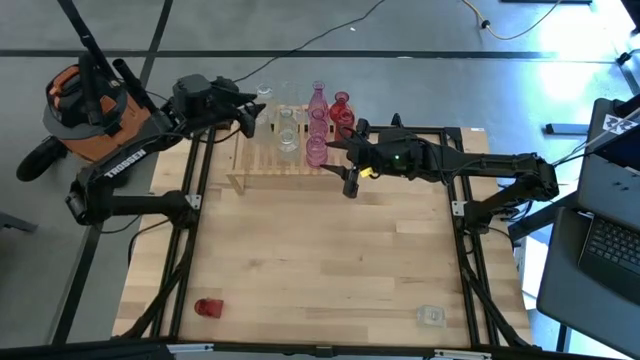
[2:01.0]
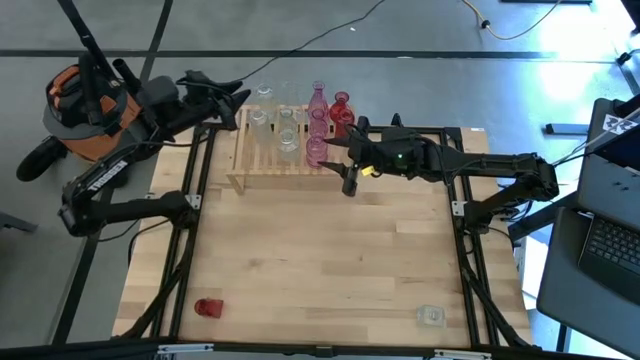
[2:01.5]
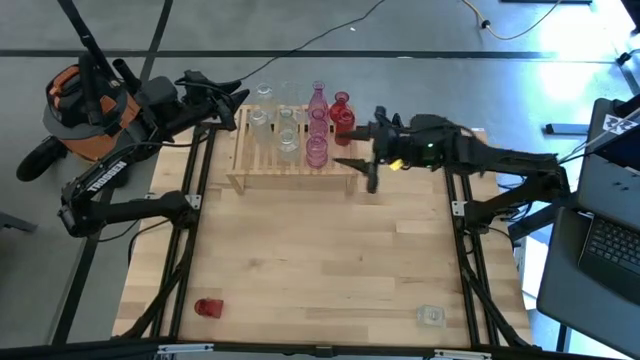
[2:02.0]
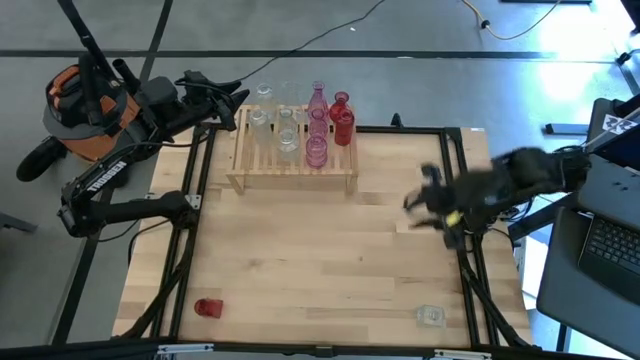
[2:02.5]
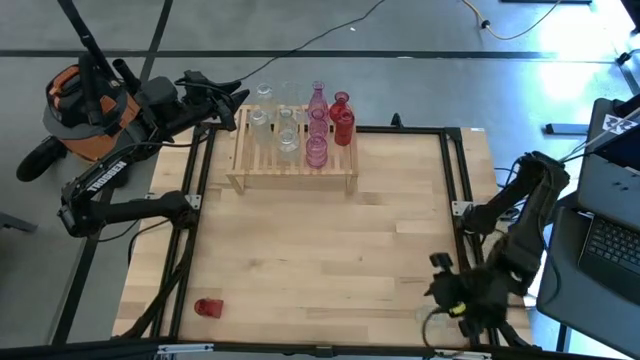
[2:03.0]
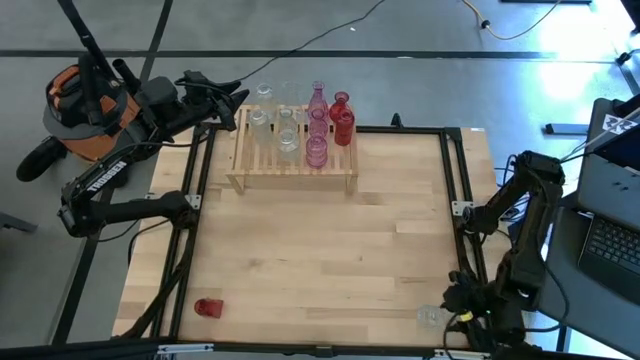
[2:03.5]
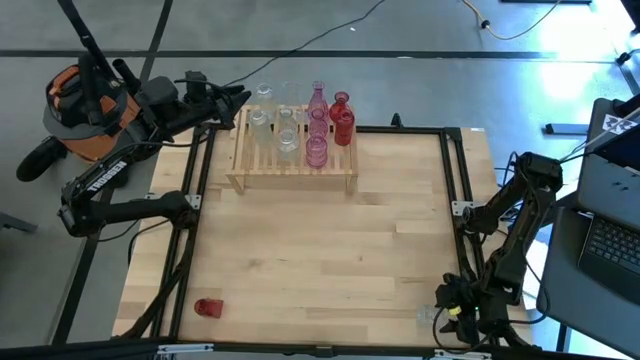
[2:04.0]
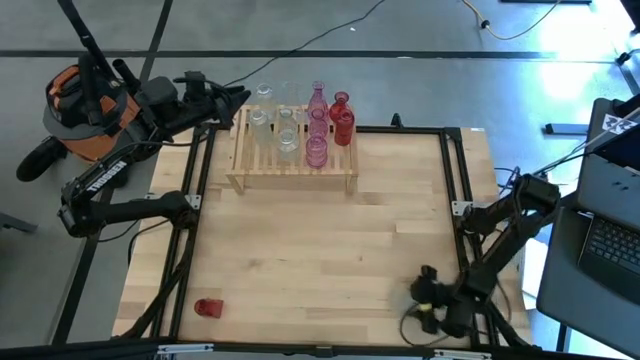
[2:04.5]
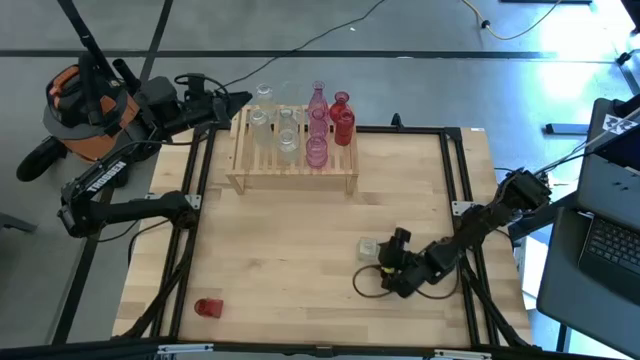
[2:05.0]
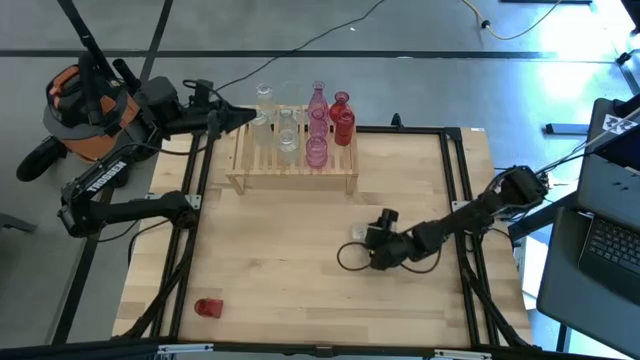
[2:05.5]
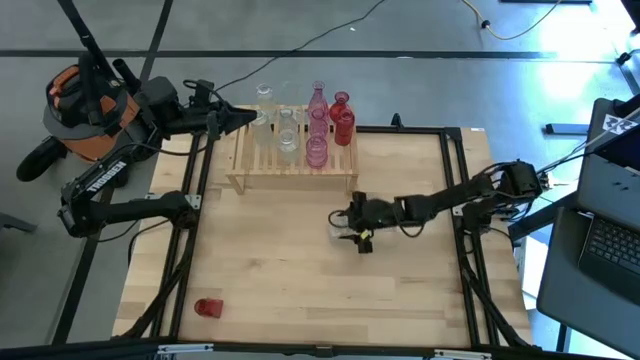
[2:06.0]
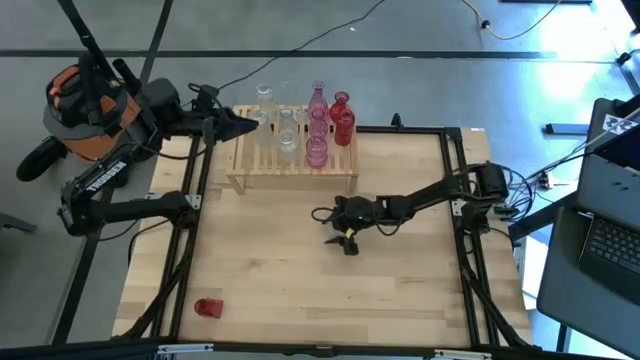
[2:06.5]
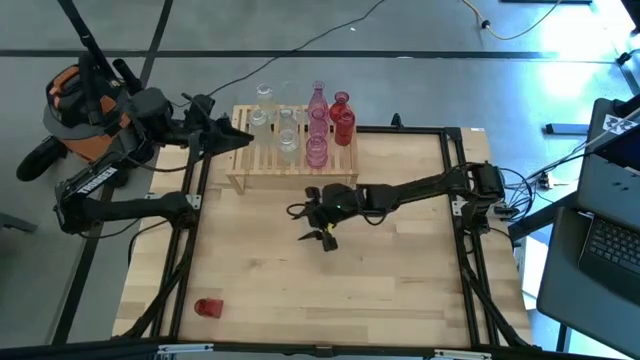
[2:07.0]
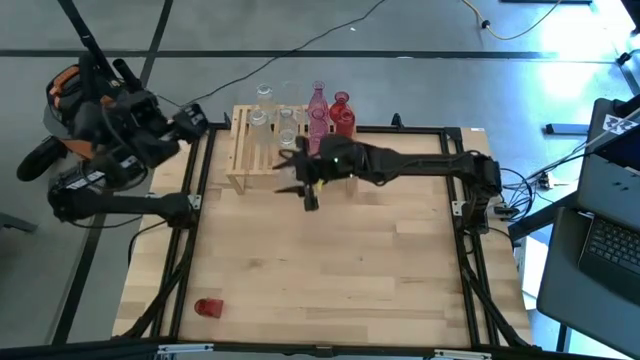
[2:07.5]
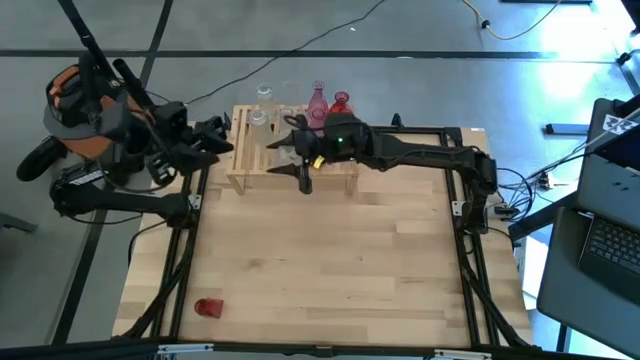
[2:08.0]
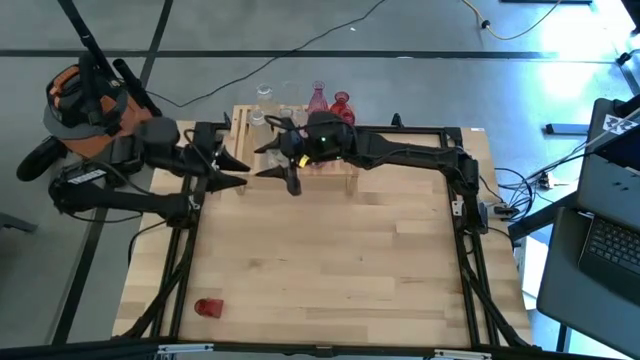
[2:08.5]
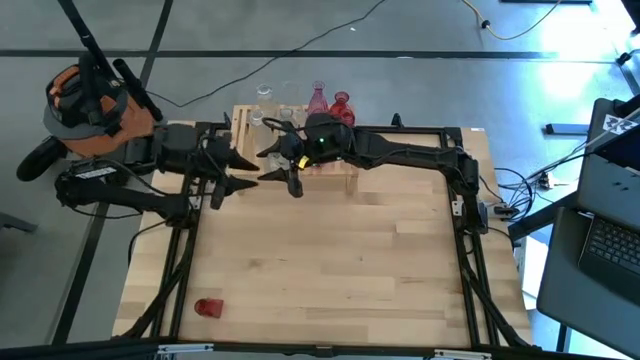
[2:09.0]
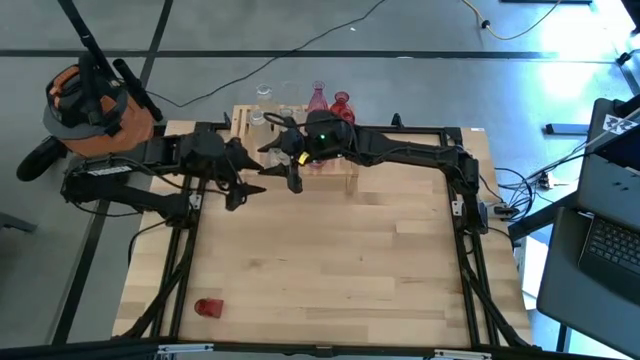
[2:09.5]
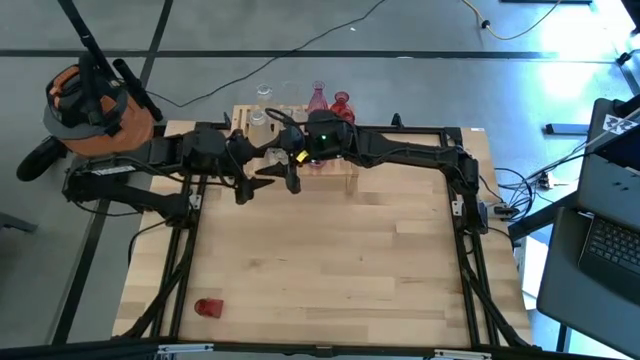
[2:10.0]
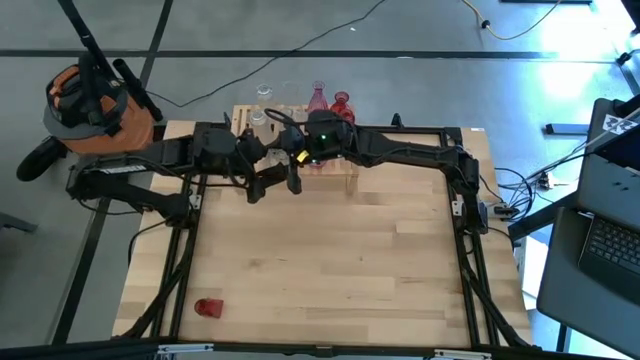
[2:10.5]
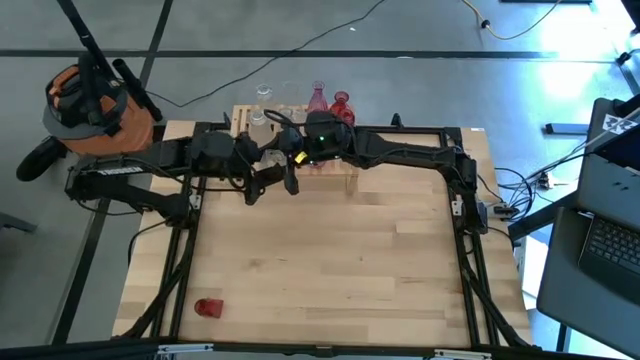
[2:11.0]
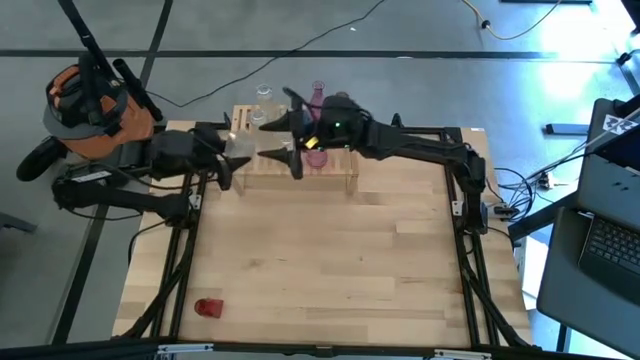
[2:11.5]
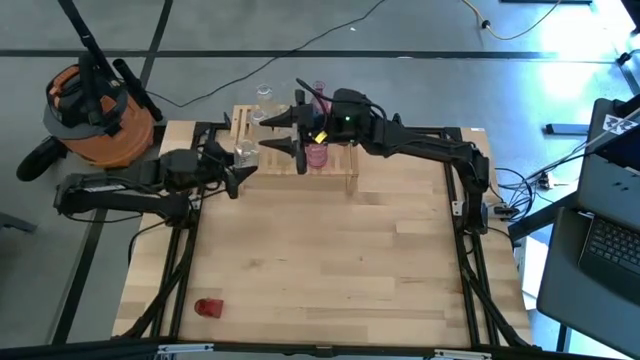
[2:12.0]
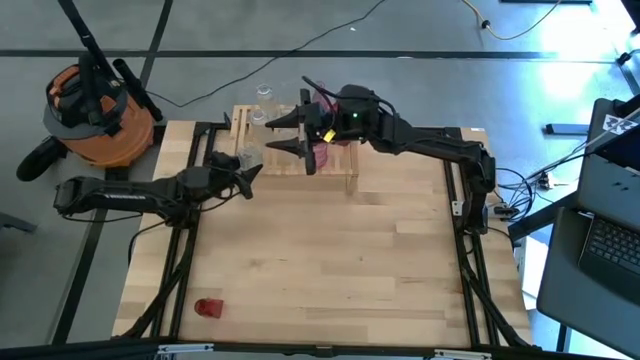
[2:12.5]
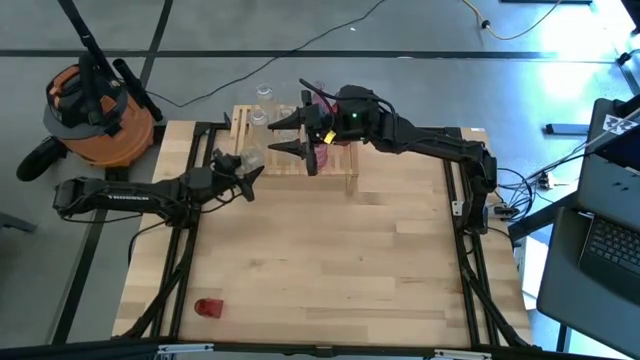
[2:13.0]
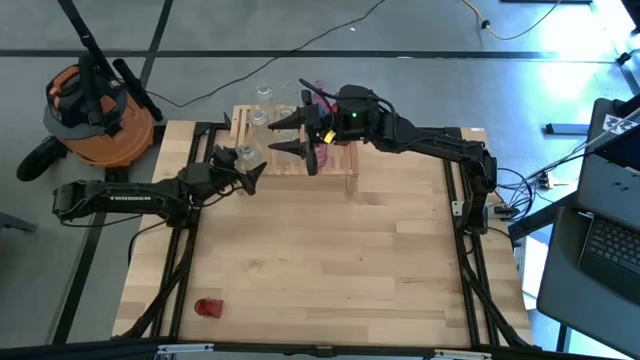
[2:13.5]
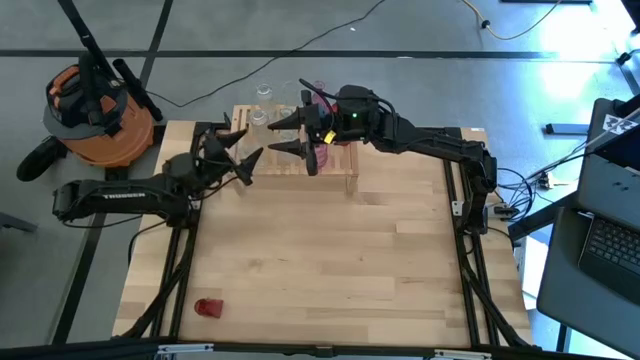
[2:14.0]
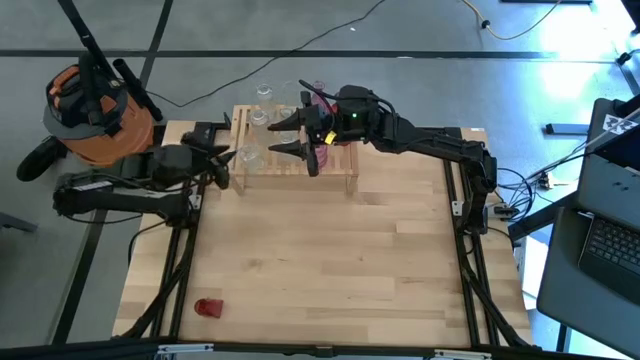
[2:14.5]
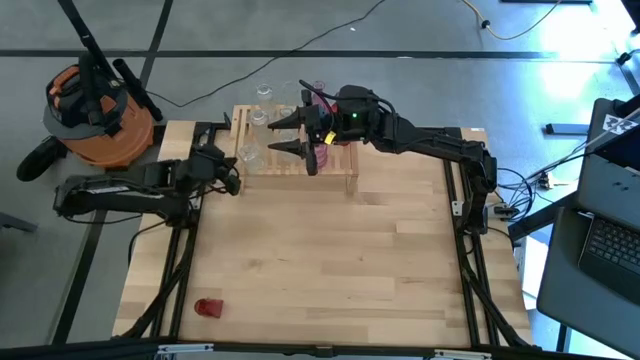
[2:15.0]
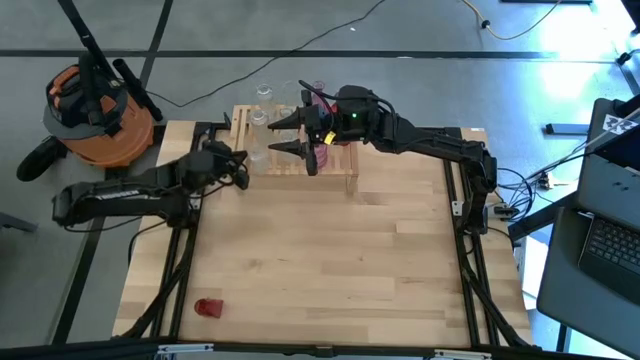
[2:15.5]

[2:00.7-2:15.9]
Task: sort vases onto shelf
Put the transparent vase on the shelf aligned with the other transparent vases on the left

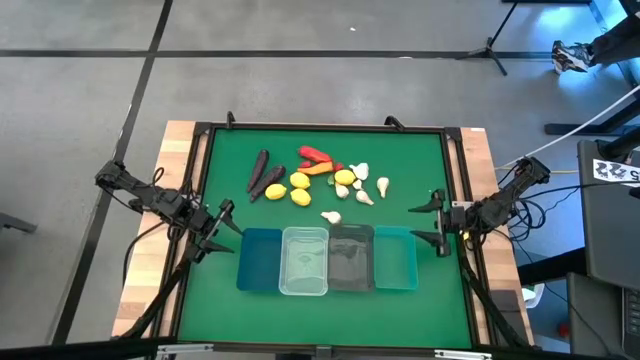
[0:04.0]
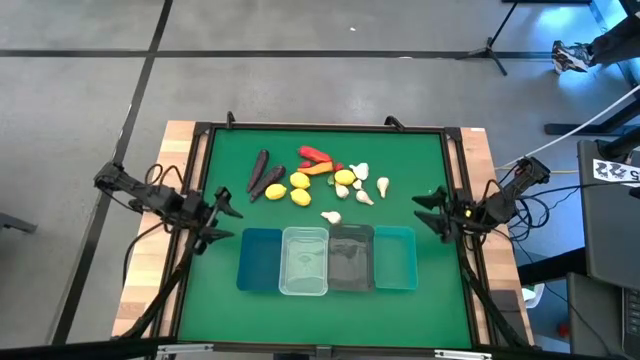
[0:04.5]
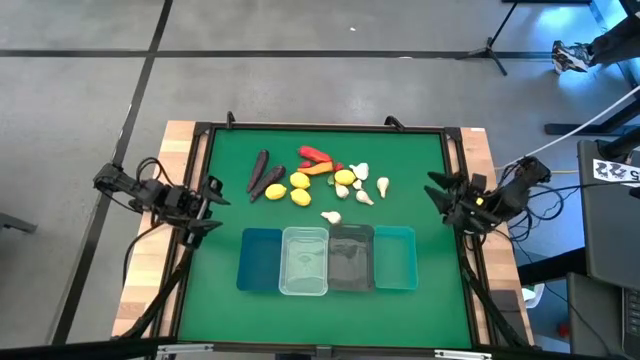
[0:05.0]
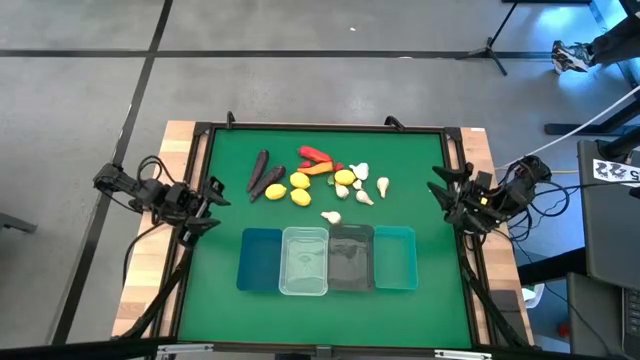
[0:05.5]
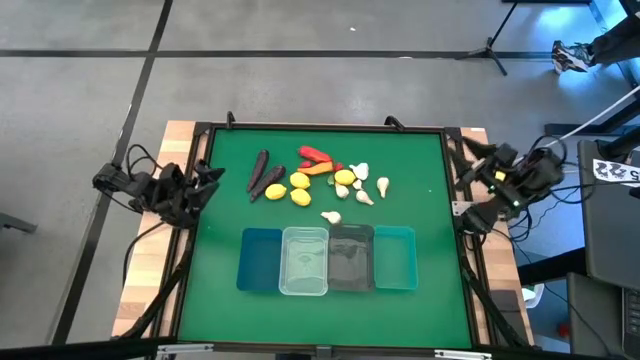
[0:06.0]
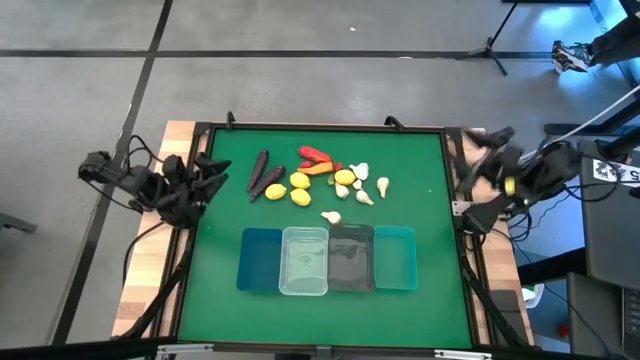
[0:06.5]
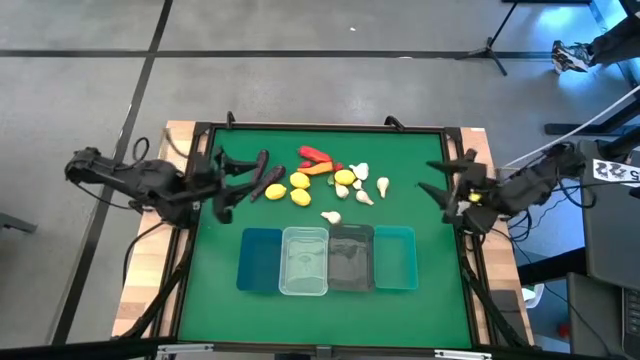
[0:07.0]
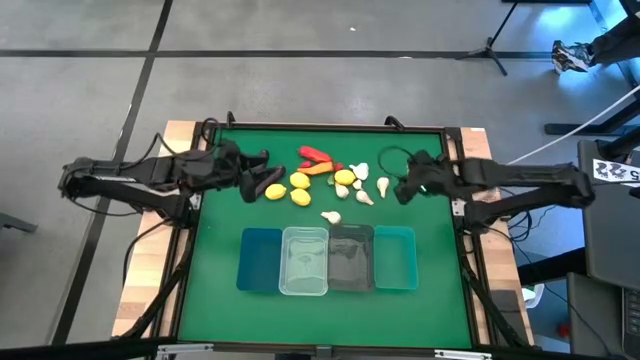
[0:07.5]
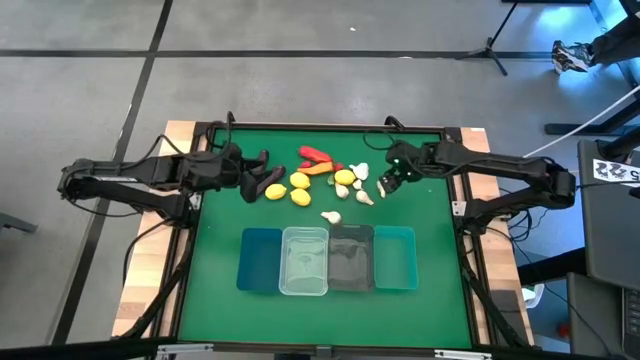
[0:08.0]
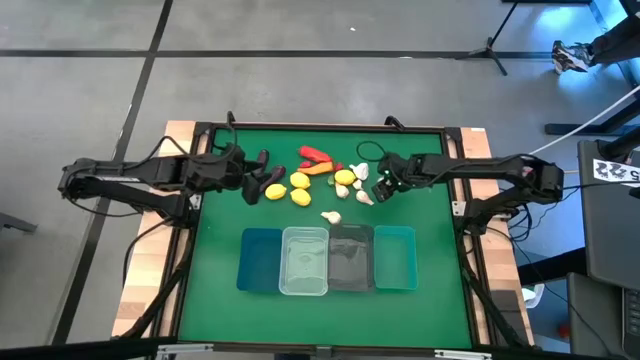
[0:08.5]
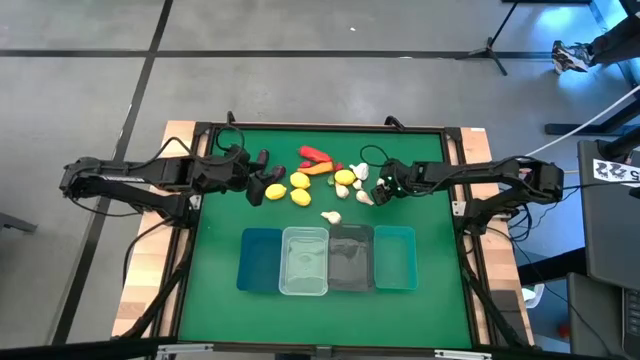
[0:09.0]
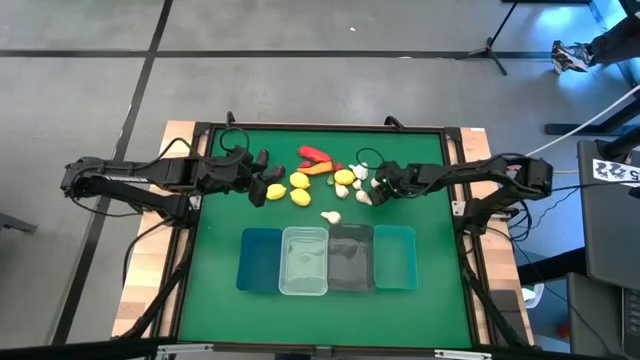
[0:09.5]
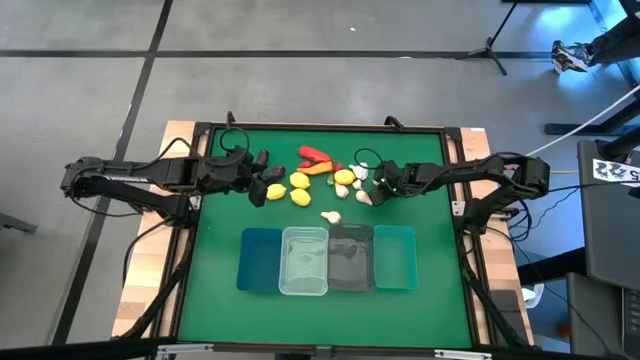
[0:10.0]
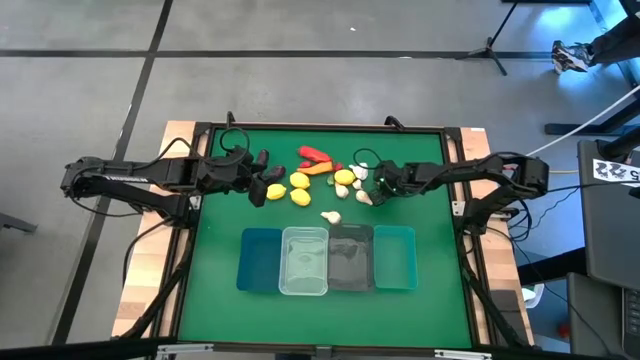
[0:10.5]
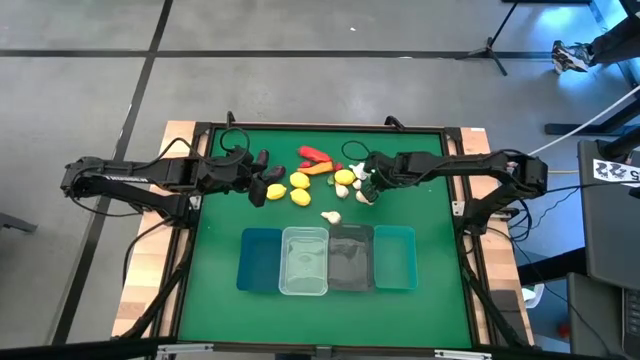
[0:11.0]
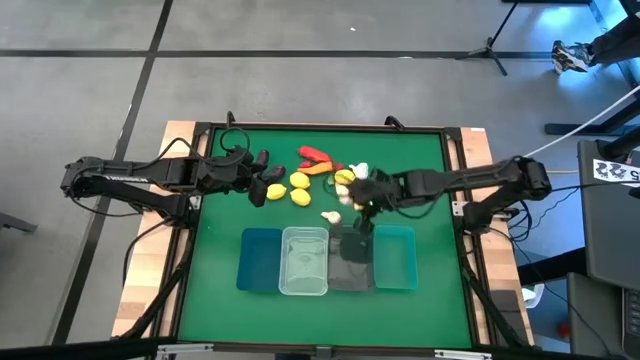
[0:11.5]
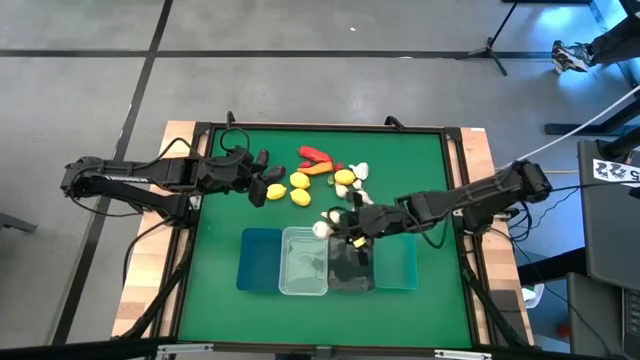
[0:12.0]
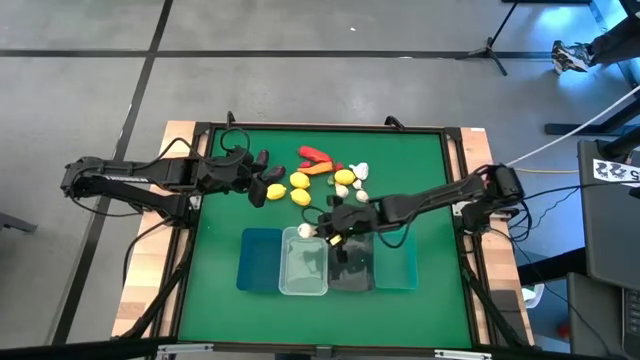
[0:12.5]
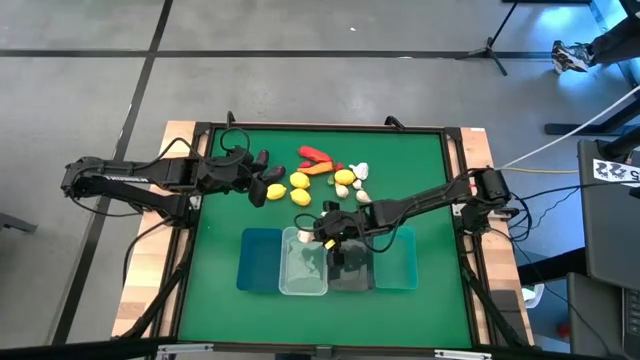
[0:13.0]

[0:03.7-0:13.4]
Task: Sort produce into baskets
Put the white garlic into the transparent bin
